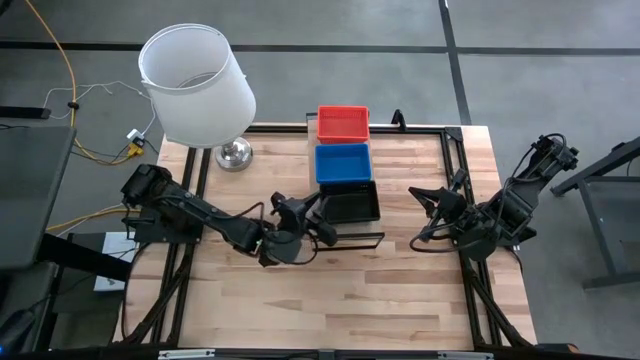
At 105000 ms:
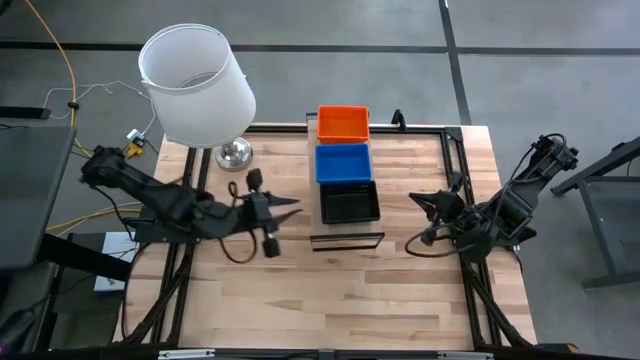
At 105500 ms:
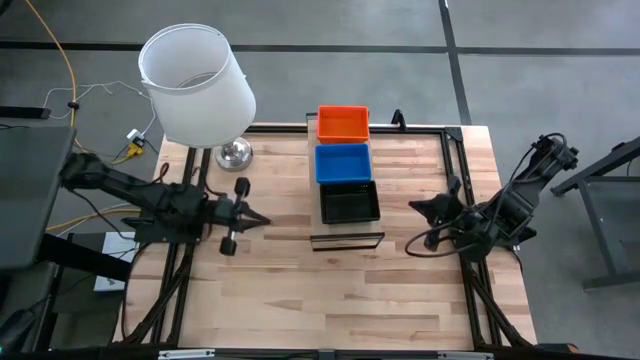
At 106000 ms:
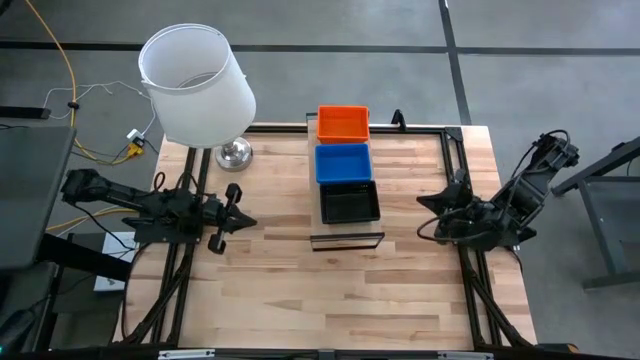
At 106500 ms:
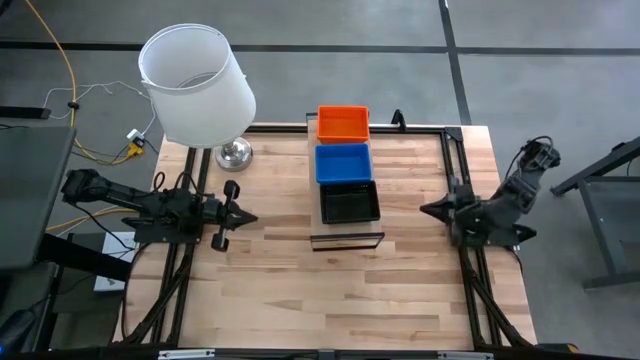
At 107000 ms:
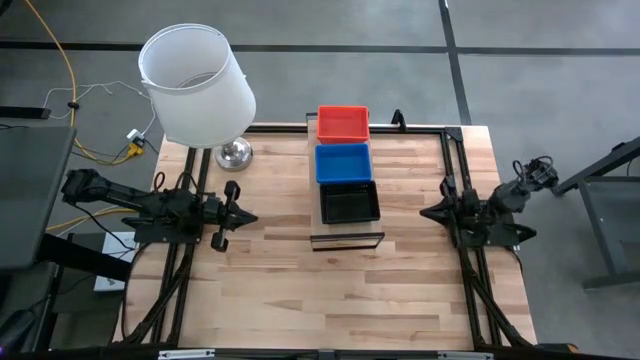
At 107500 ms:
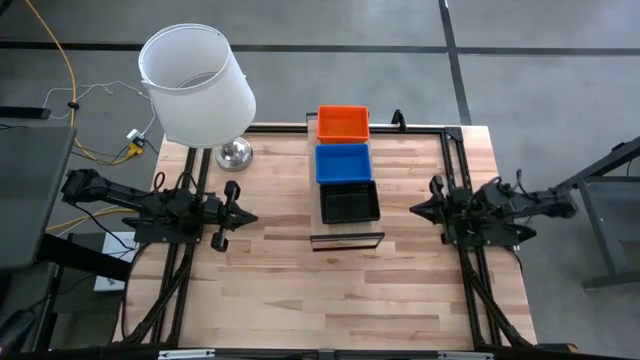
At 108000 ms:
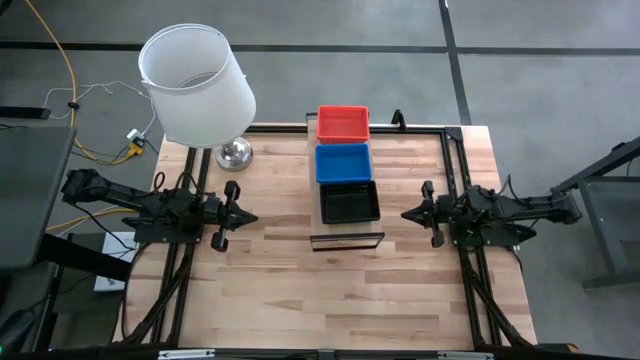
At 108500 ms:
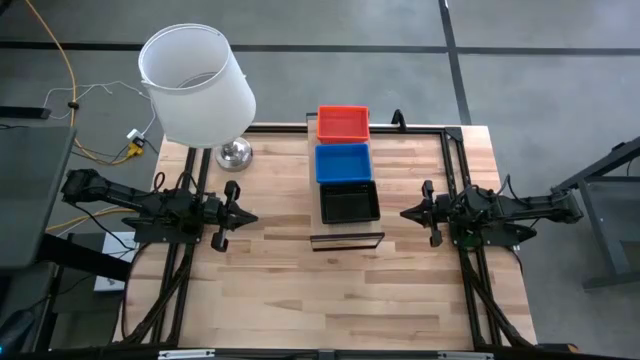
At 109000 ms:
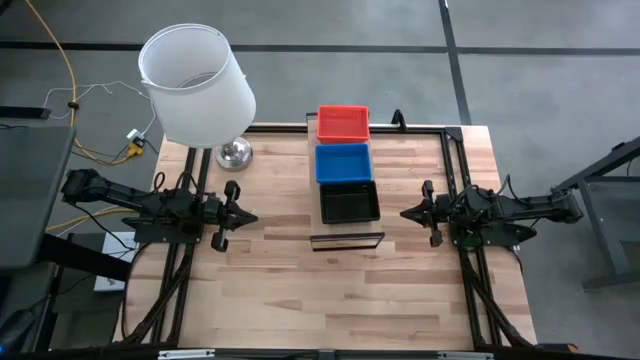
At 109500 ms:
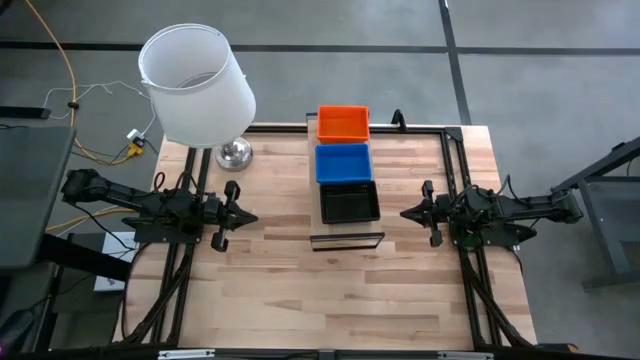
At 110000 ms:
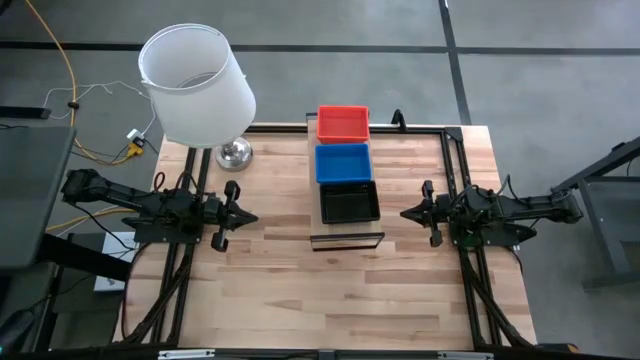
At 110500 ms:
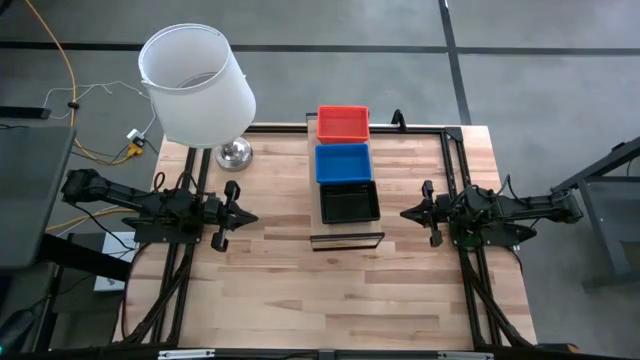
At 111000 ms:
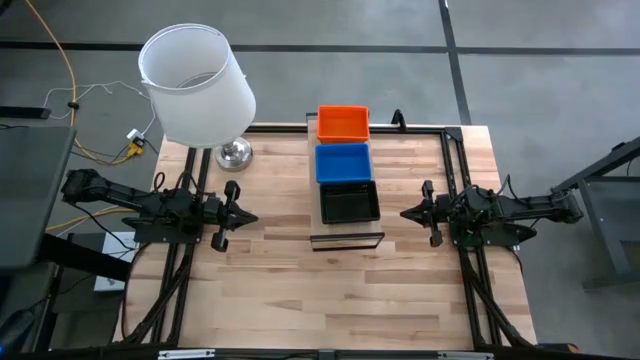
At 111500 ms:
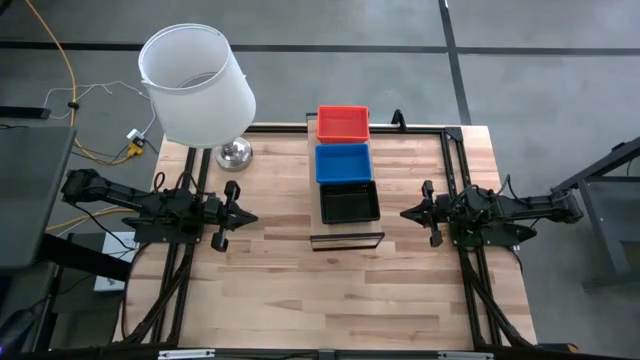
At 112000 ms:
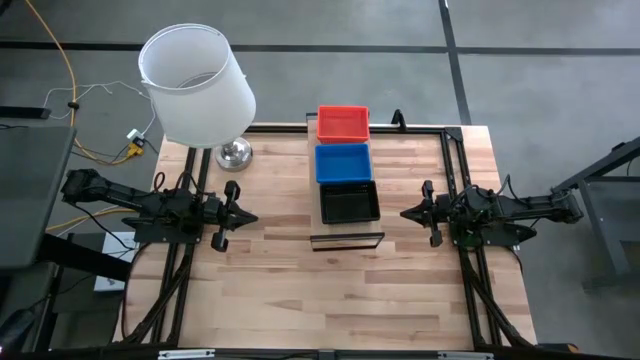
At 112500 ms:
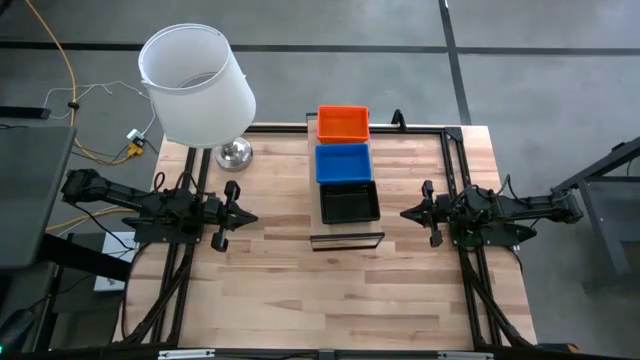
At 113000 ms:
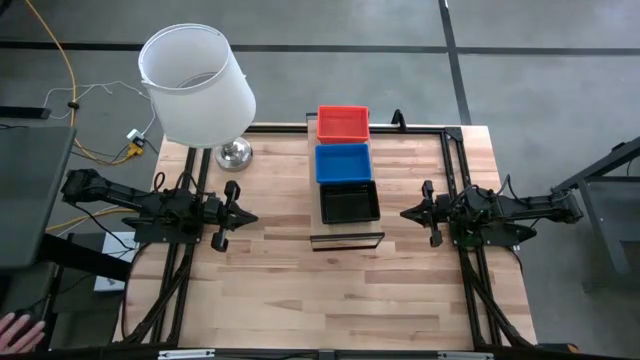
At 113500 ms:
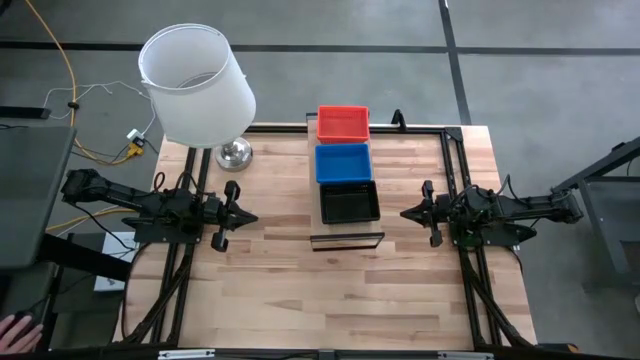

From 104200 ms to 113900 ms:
Task: Stack baskets on shelf by color
Return to Home Position

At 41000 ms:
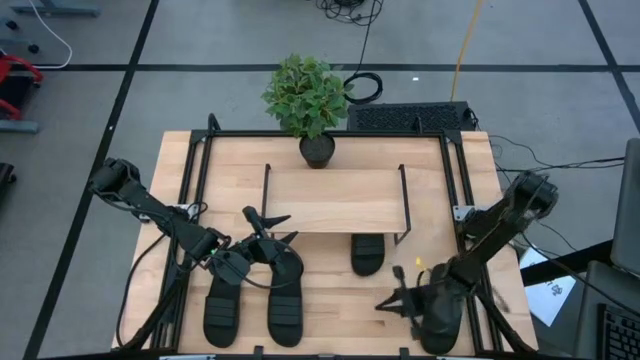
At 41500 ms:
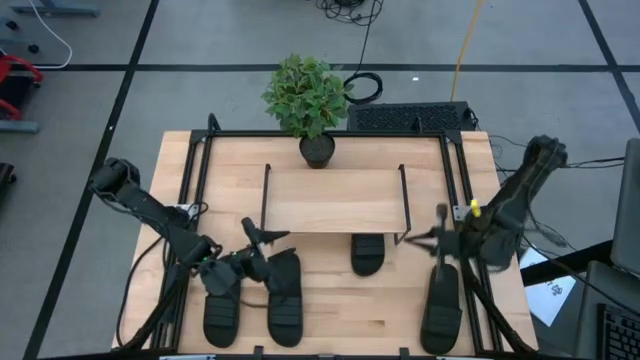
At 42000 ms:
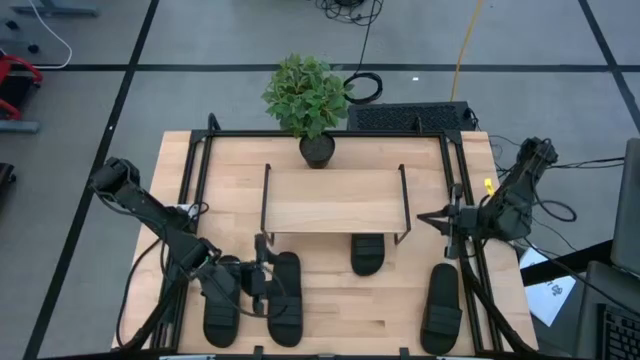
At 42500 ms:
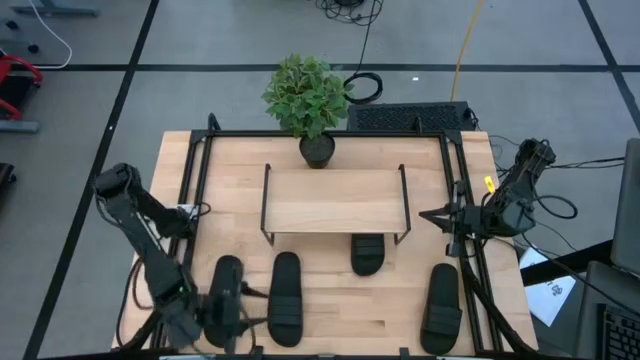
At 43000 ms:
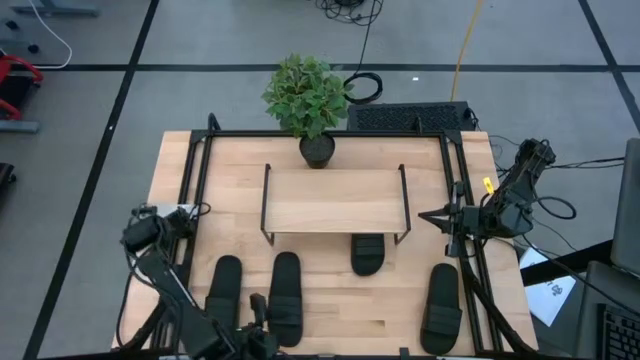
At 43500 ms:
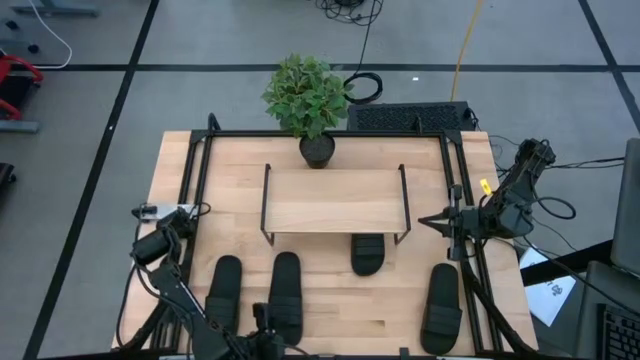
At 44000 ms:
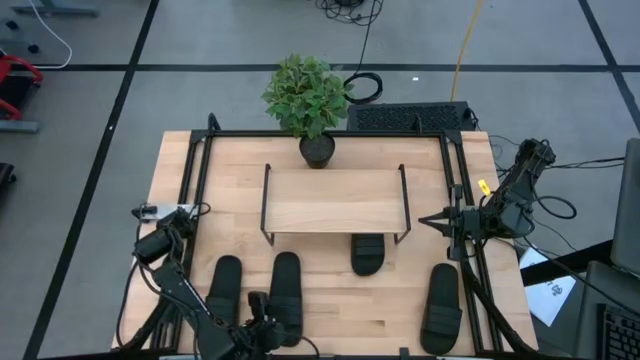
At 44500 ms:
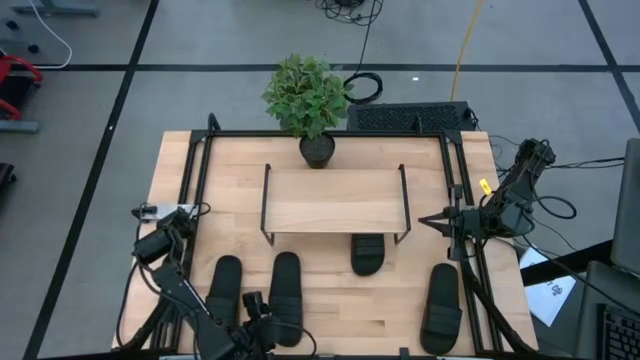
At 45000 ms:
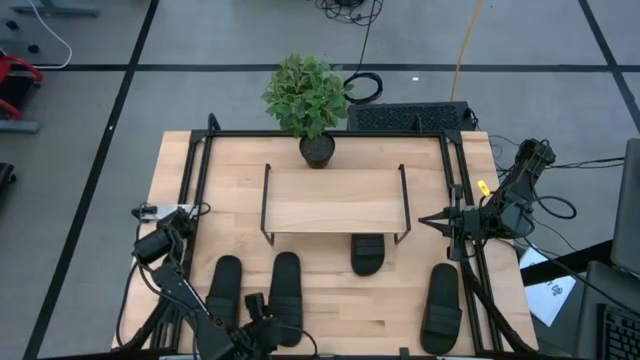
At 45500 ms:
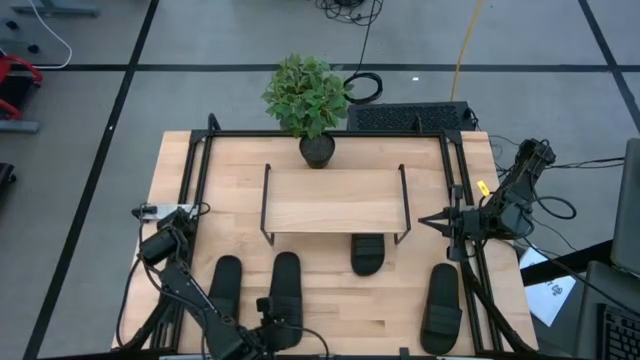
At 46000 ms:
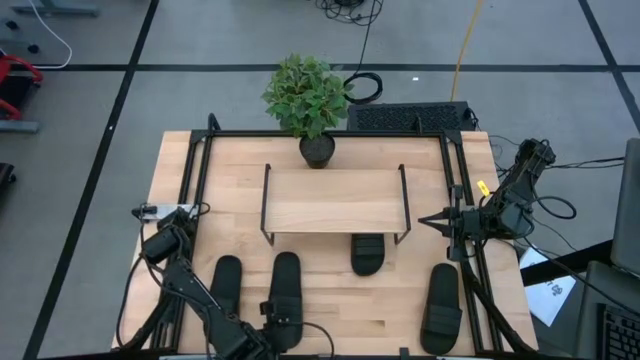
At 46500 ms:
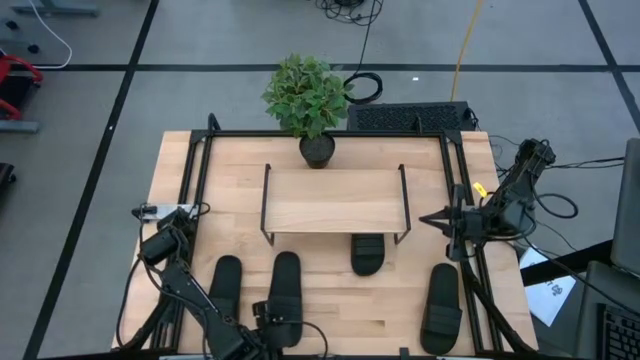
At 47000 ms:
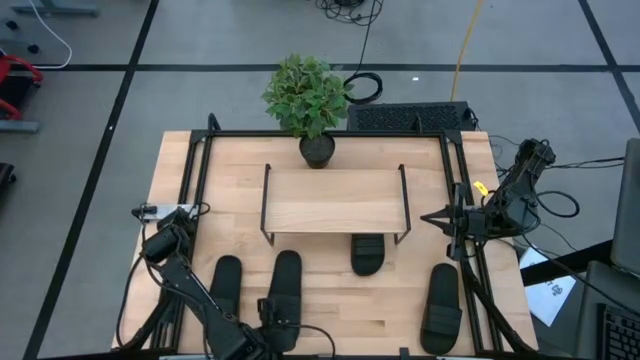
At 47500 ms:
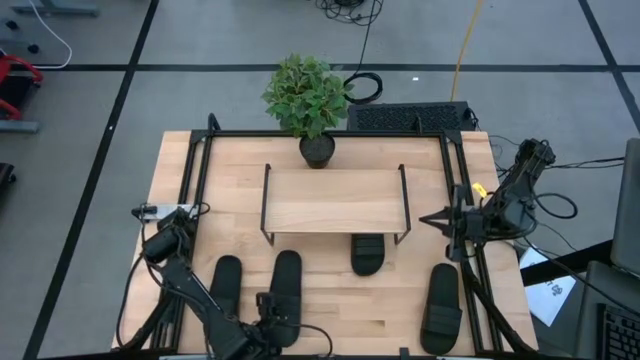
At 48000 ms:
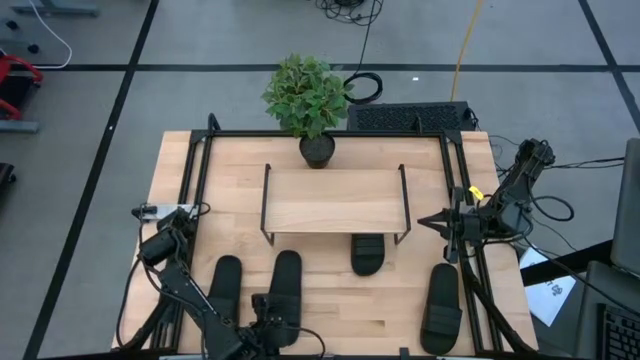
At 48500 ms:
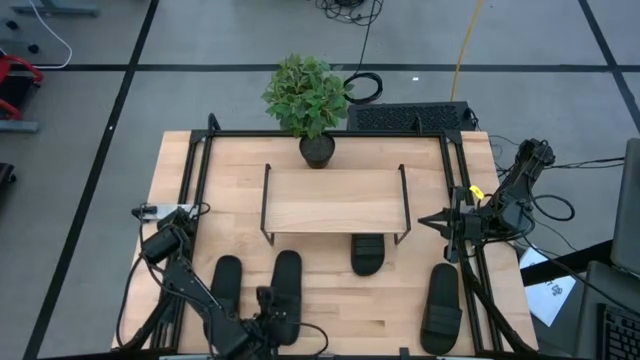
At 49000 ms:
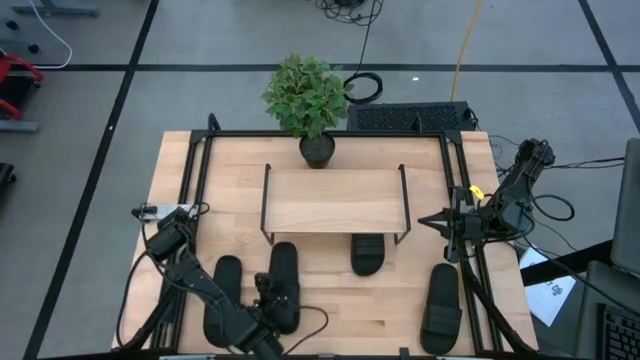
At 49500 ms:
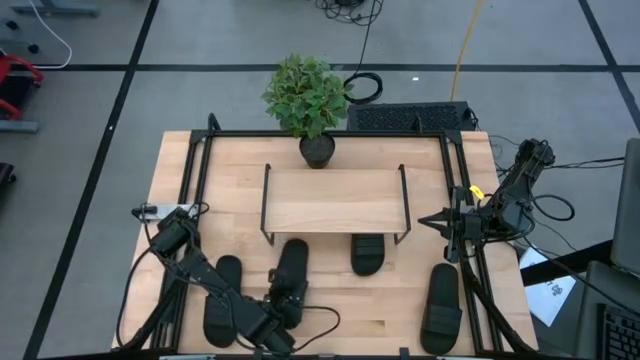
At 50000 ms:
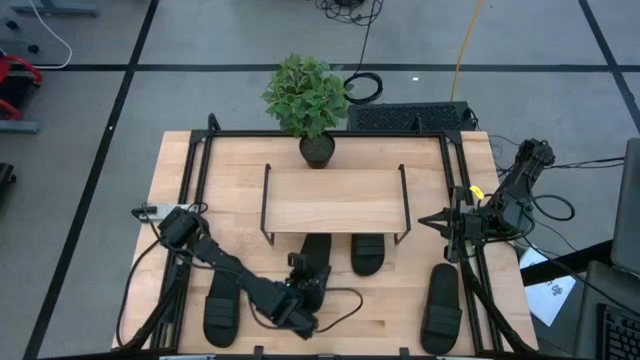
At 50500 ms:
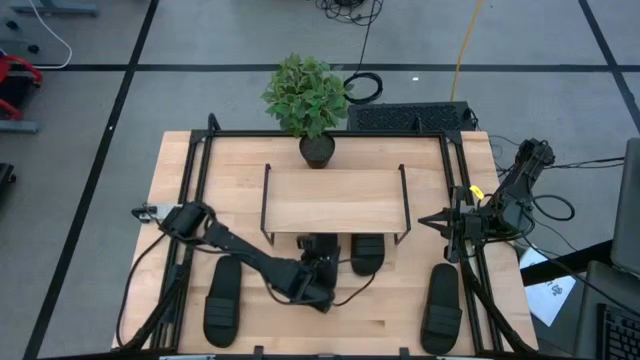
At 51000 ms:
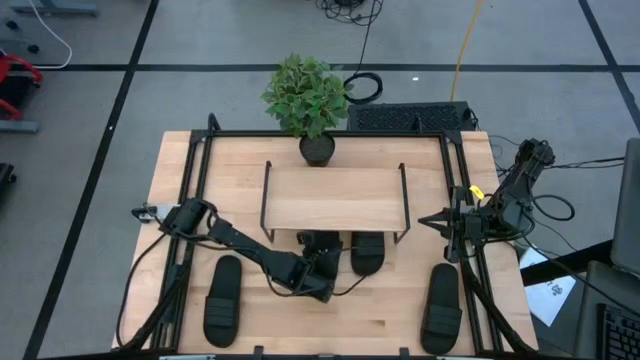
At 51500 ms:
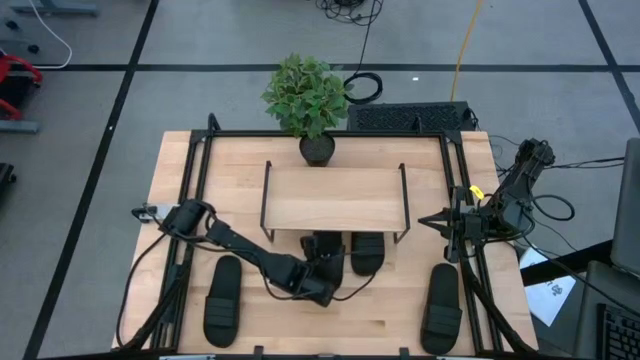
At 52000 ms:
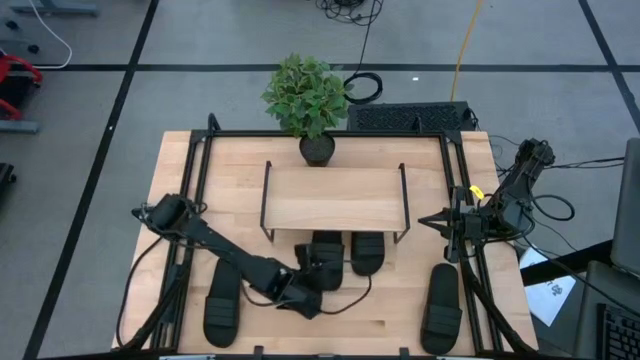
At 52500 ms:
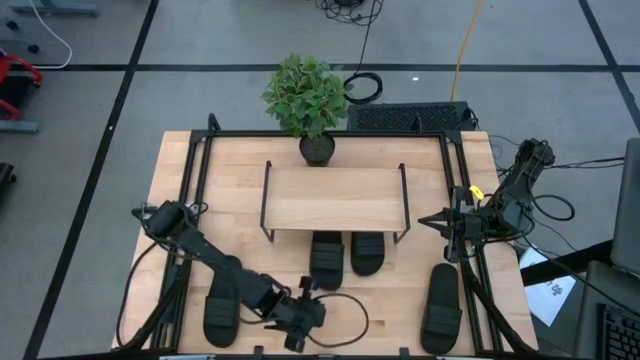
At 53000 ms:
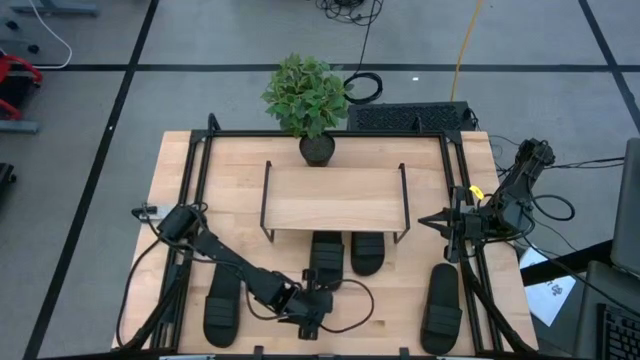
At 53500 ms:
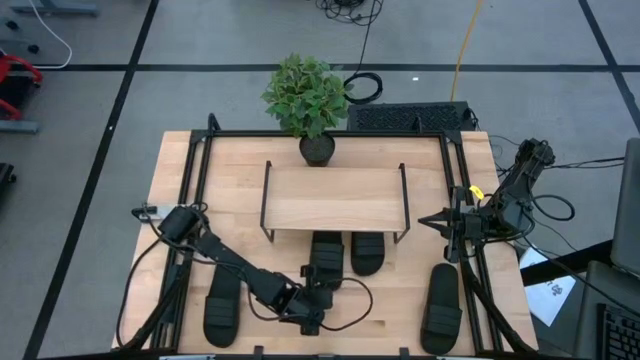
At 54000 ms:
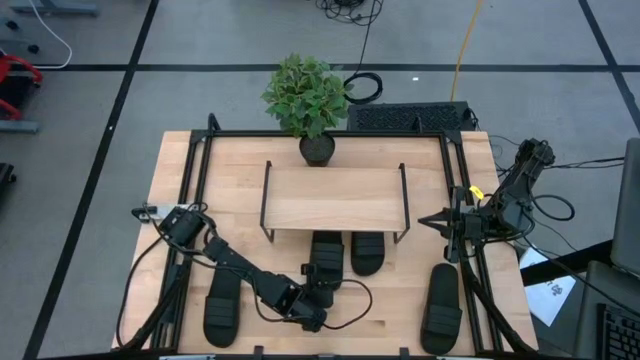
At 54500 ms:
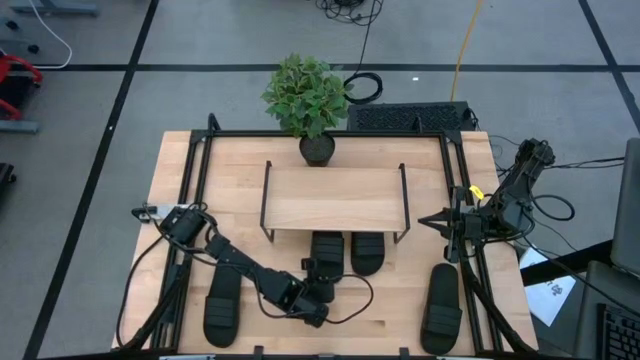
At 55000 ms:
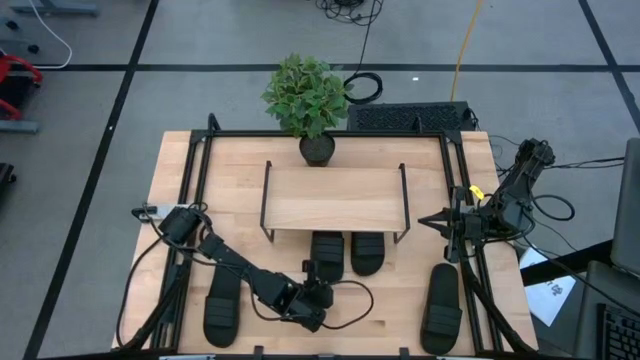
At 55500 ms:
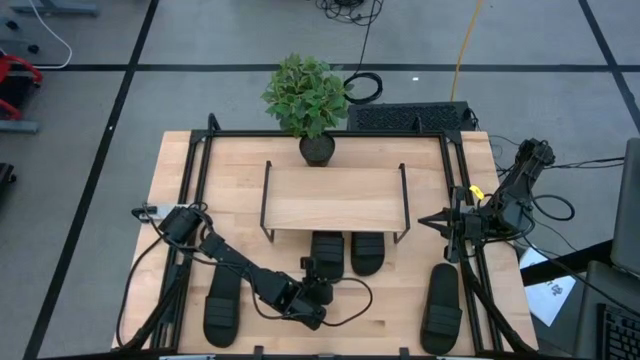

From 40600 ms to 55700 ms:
Task: Pick and place slides into the shelf
Put the black slides under the shelf
